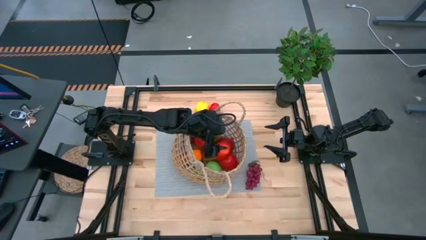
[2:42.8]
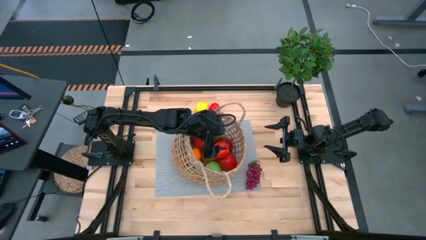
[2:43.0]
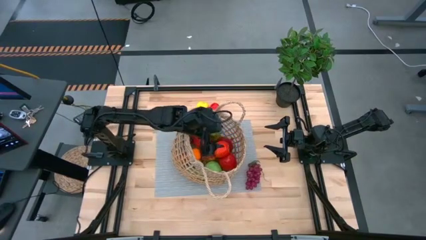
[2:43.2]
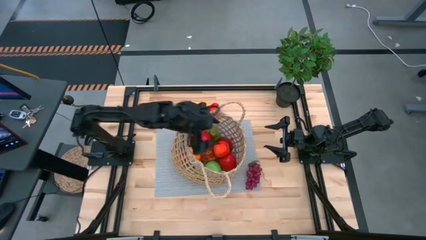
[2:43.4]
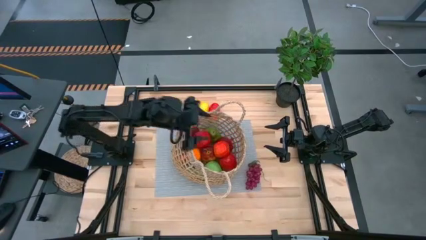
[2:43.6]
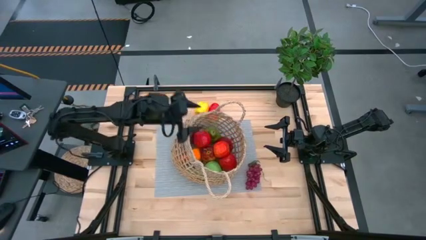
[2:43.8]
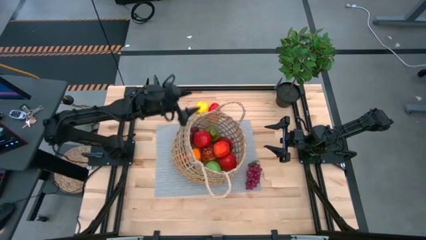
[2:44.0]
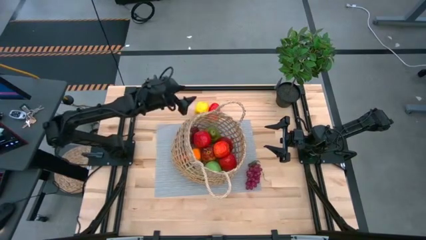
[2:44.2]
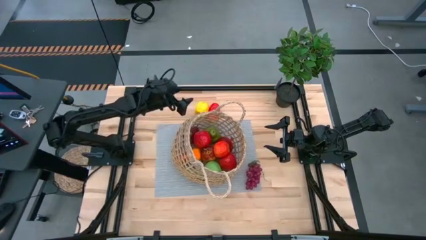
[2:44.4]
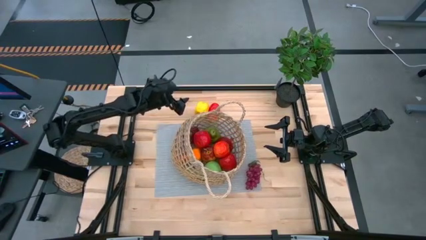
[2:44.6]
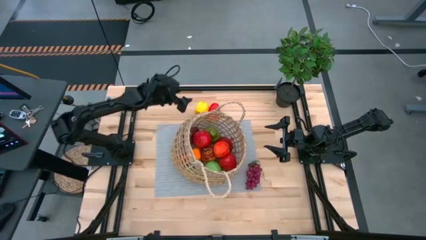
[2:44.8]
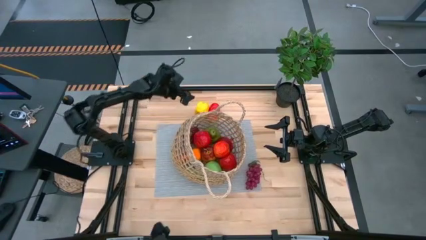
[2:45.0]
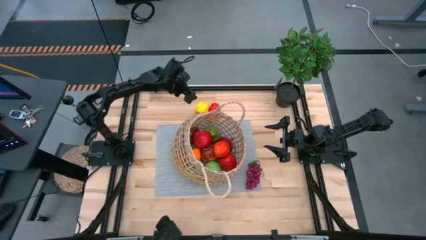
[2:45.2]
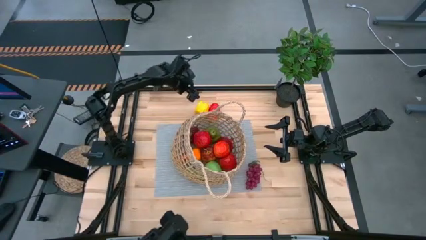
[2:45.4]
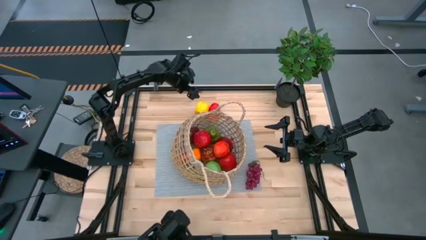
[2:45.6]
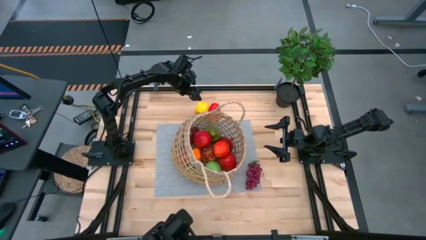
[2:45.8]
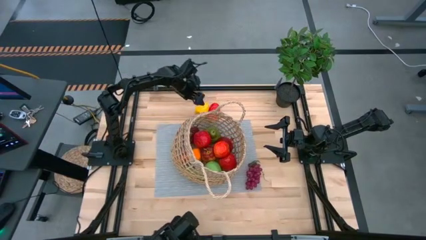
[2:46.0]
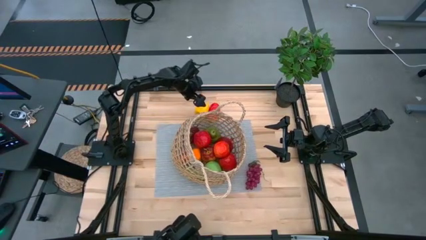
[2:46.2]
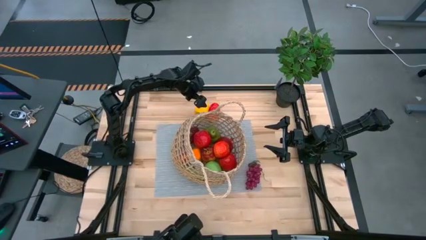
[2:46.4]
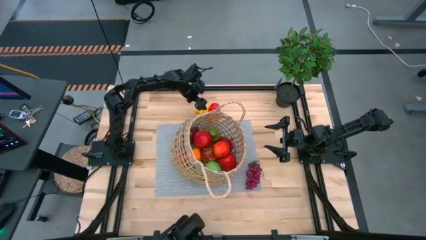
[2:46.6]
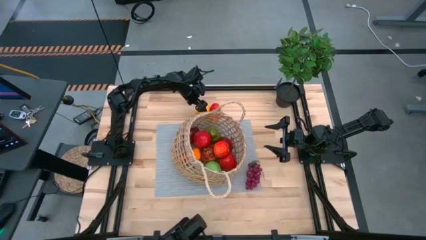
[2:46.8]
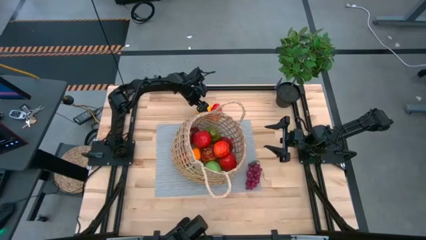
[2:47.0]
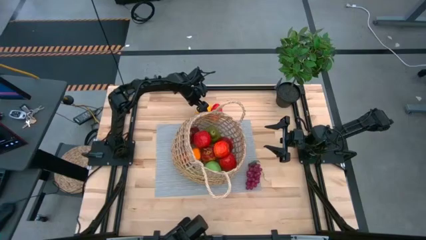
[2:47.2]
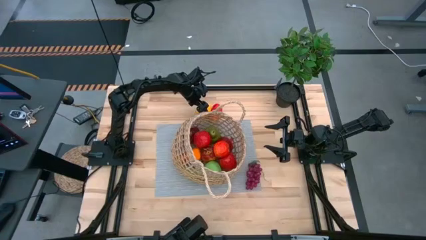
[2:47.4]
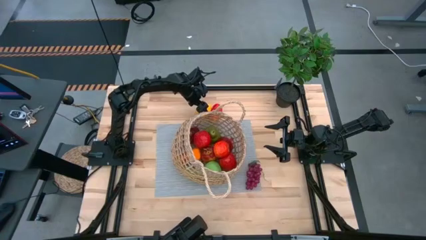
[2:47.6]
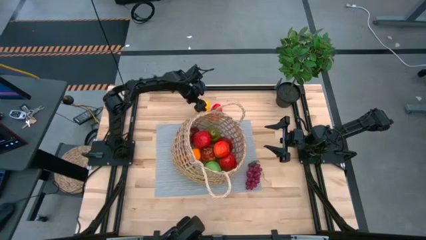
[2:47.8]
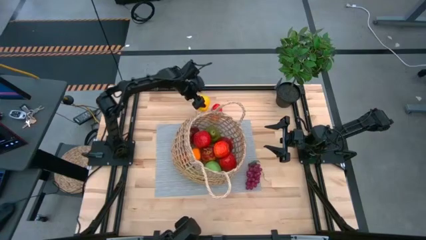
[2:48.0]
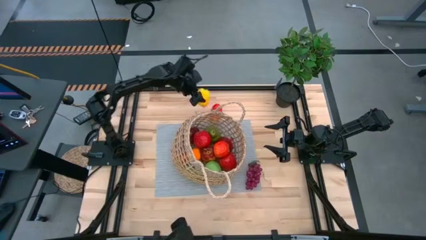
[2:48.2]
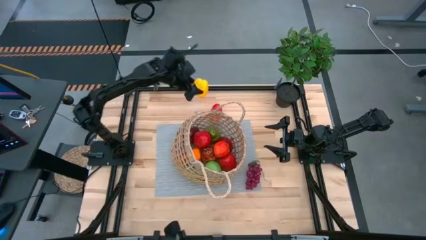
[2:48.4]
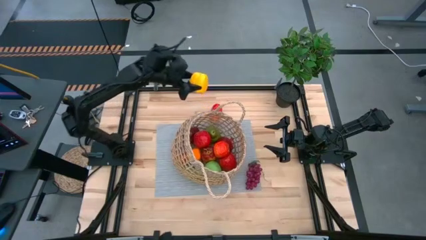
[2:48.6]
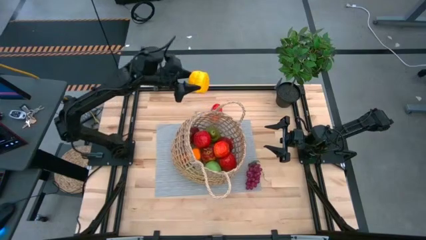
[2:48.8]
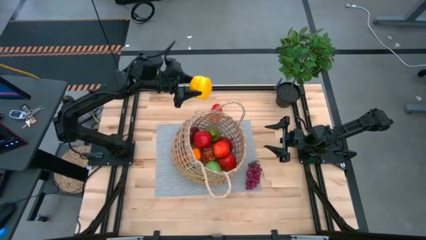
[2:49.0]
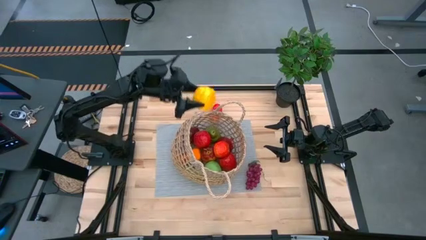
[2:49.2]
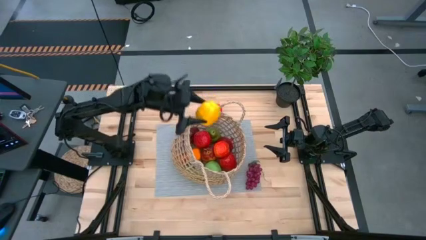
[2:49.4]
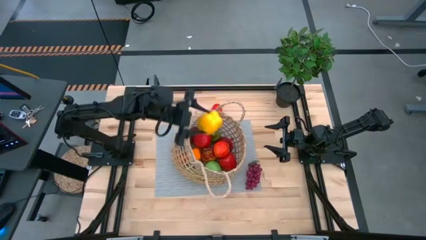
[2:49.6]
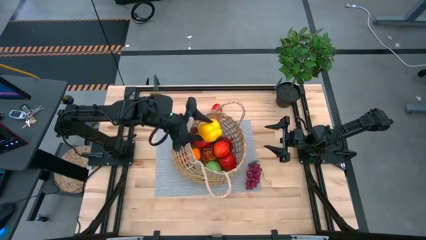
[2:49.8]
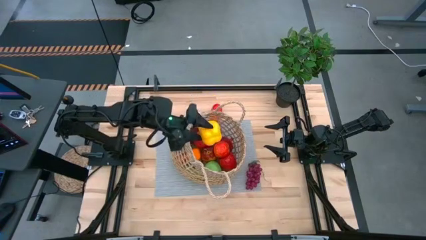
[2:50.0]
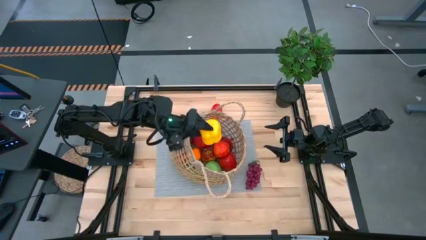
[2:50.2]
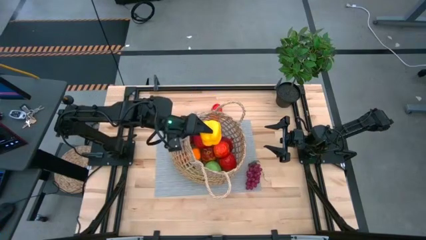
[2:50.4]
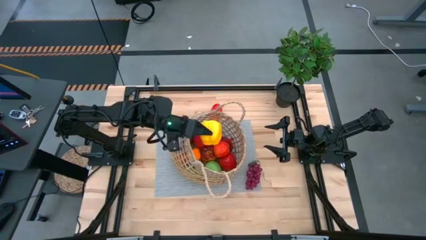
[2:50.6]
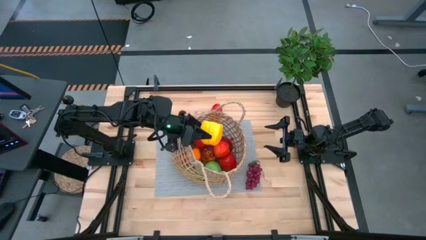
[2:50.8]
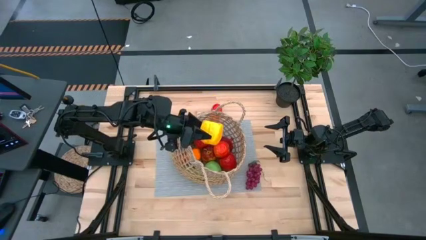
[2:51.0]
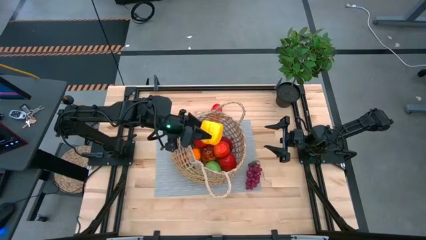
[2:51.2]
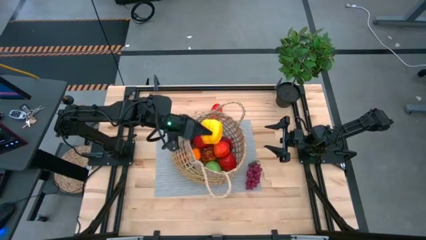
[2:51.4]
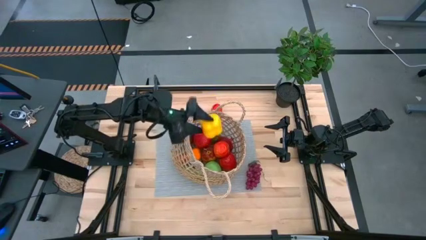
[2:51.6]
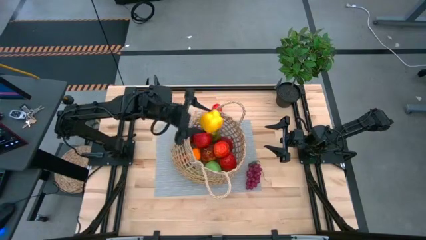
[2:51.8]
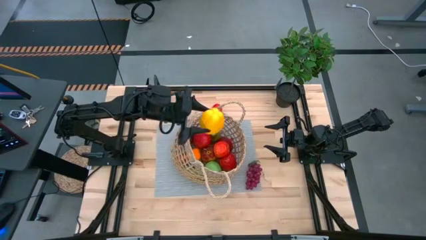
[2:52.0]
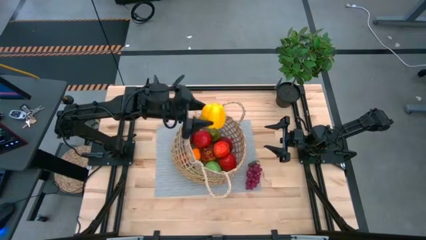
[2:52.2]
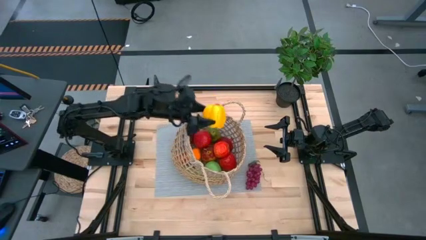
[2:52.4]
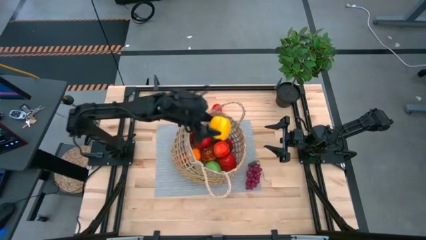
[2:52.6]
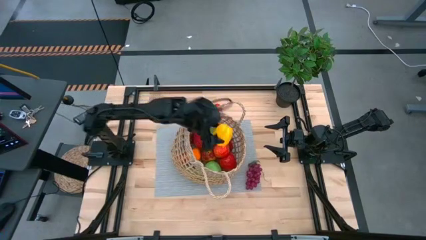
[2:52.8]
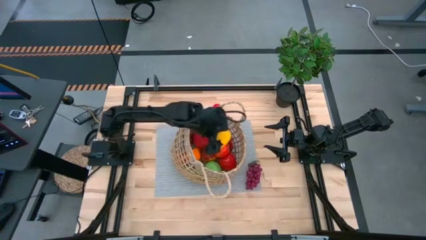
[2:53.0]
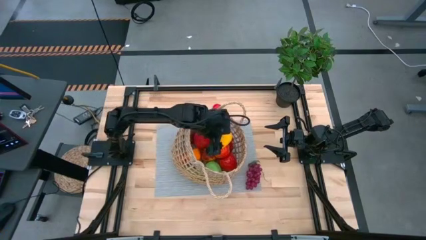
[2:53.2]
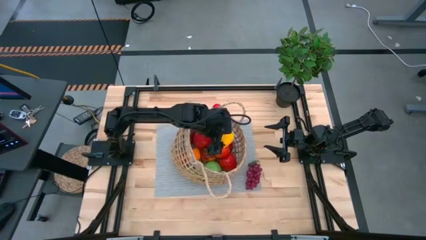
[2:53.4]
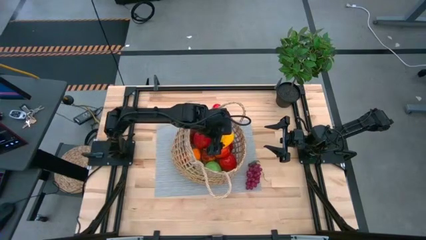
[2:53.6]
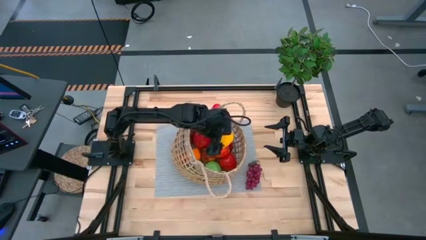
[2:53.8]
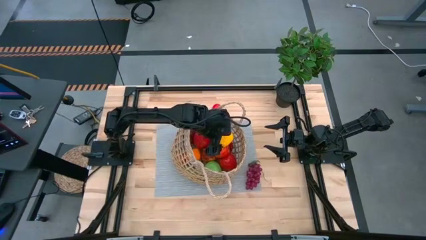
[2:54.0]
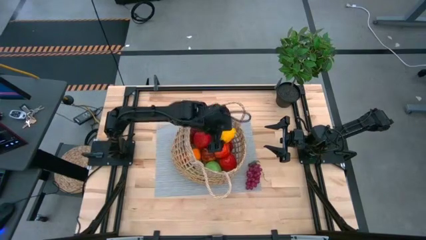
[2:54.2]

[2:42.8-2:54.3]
Task: Build produce basket
Put the yellow bell pepper into the basket

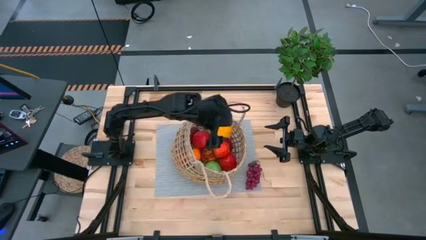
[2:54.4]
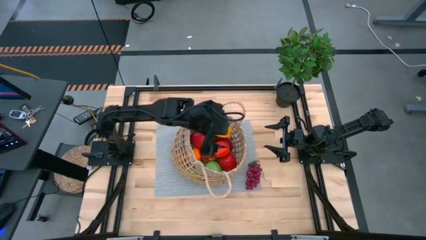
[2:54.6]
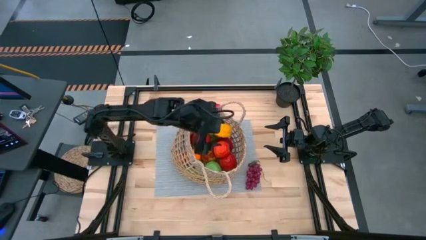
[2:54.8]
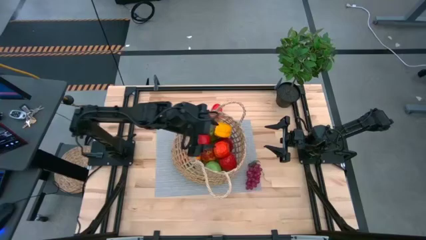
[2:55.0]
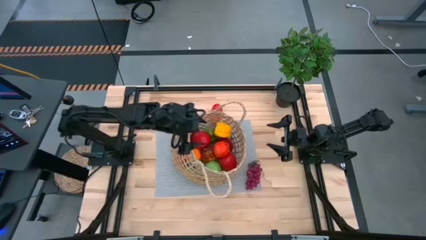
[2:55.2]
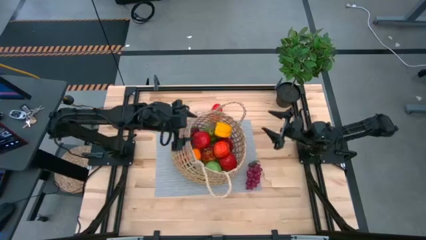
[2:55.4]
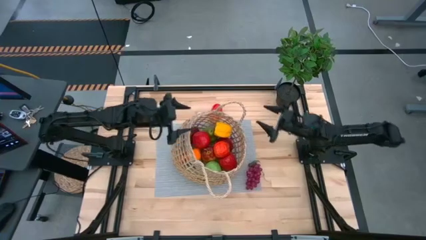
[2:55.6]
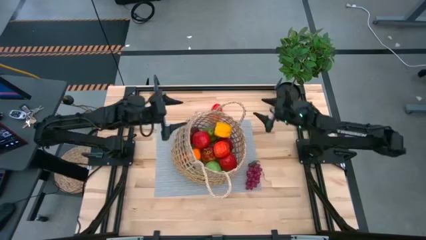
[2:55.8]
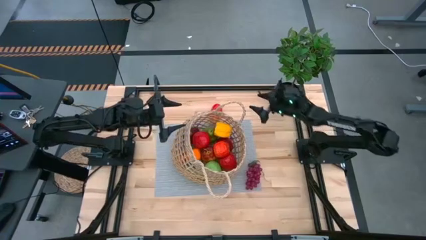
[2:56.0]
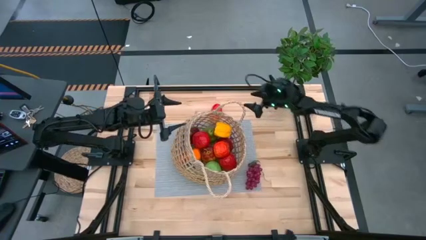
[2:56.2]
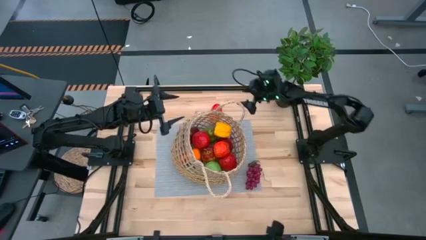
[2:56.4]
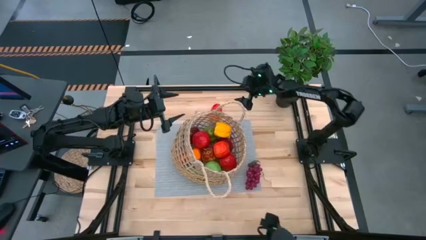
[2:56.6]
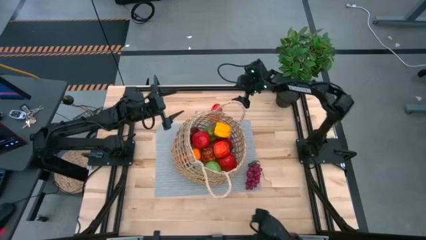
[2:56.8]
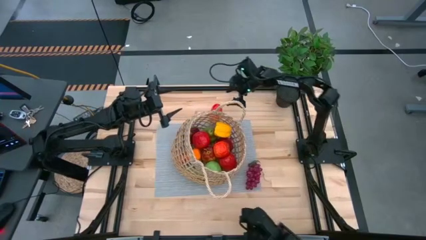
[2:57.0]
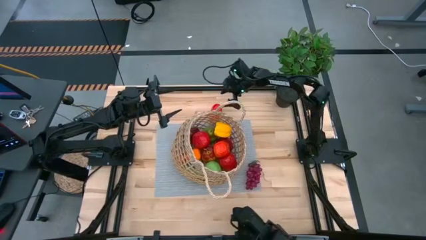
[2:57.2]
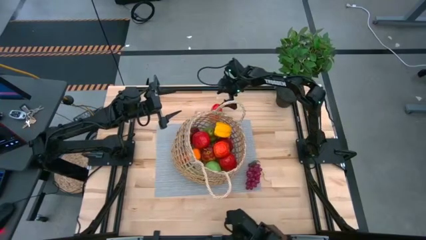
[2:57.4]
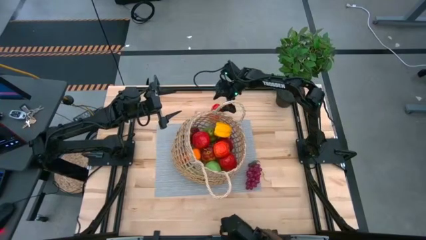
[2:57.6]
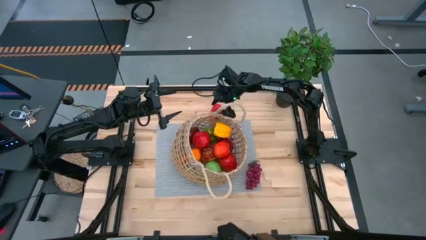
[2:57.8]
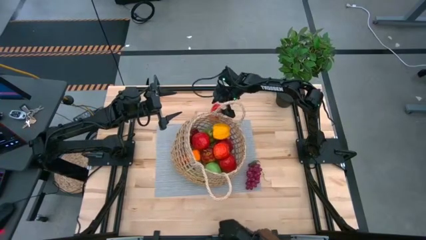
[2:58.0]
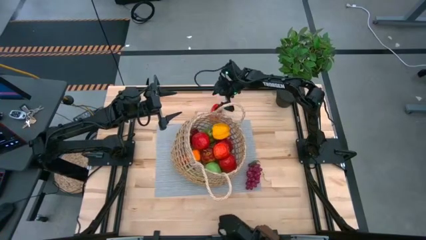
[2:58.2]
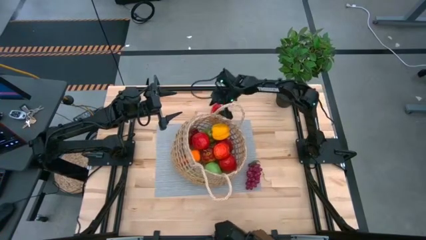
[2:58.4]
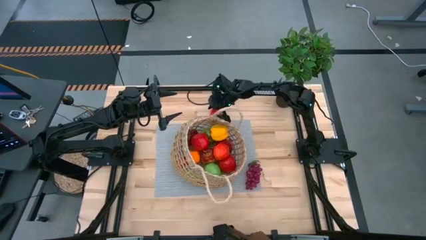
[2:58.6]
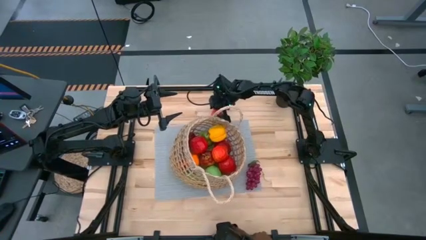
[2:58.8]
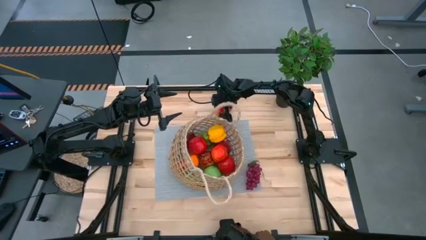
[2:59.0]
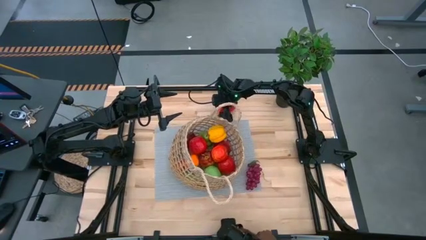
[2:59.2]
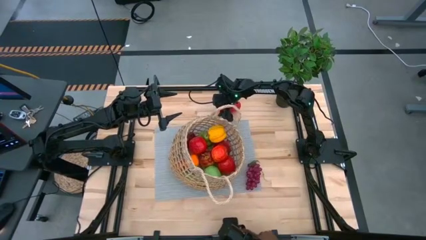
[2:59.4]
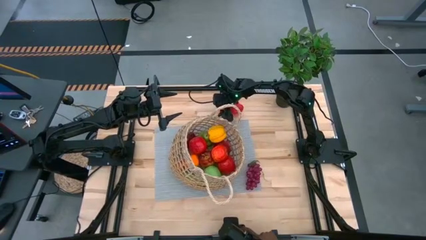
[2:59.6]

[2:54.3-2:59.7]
Put the red mango into the mesh basket
